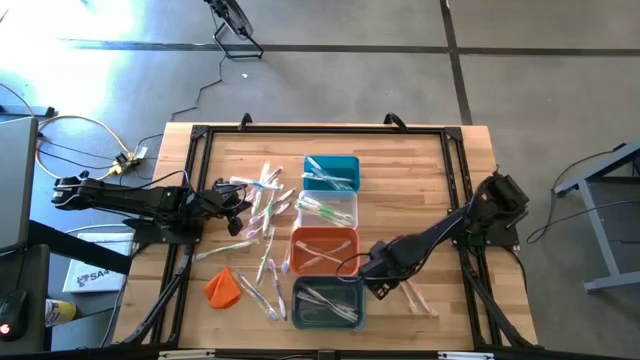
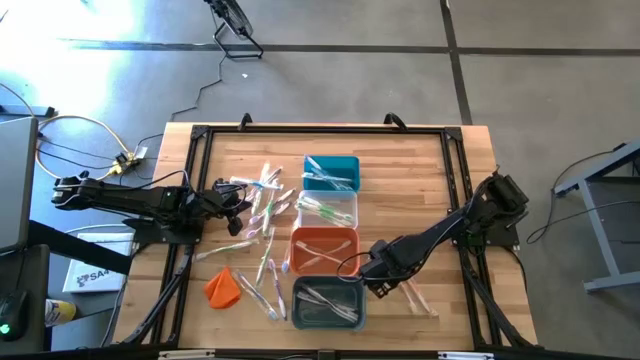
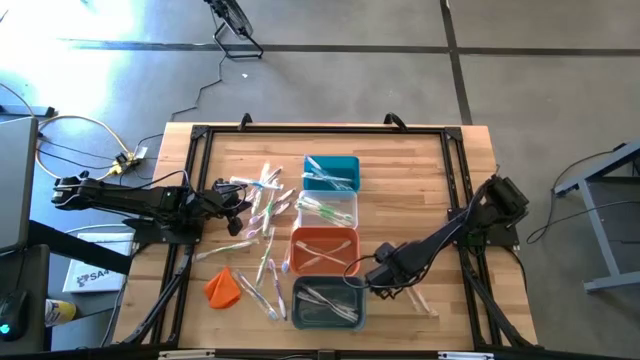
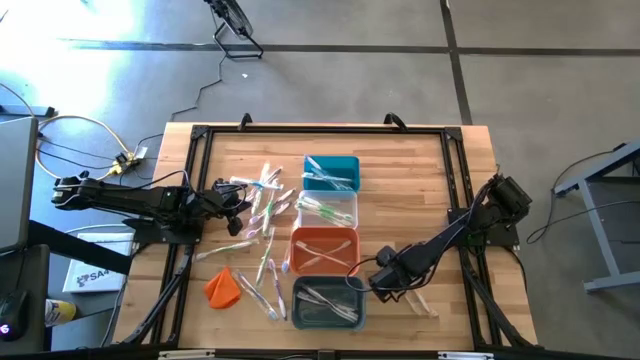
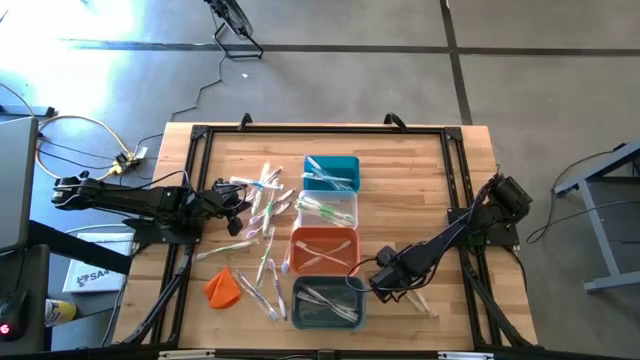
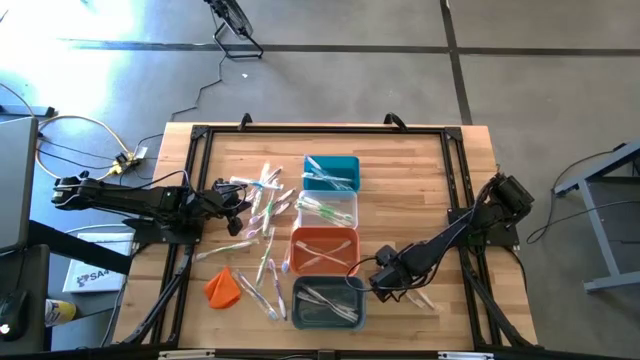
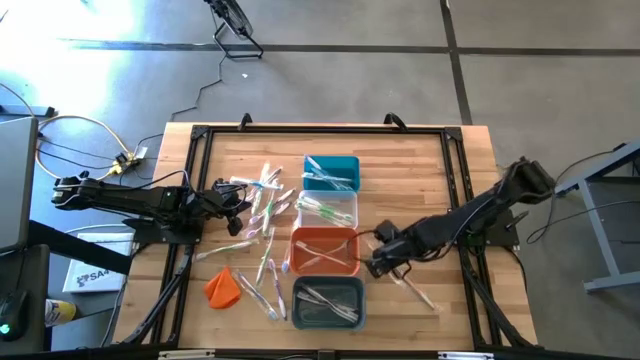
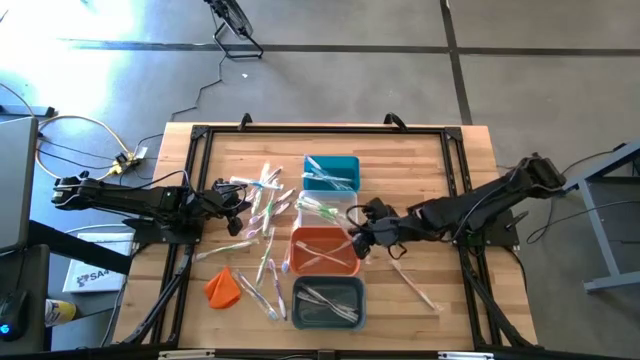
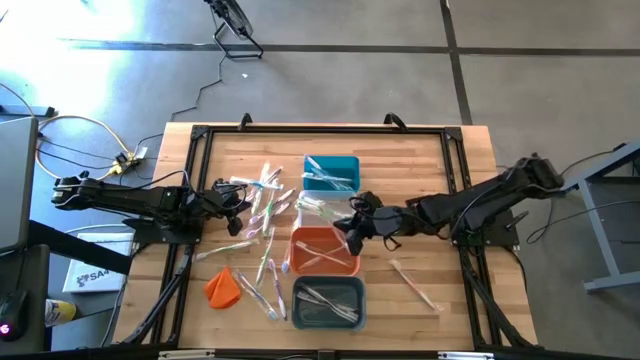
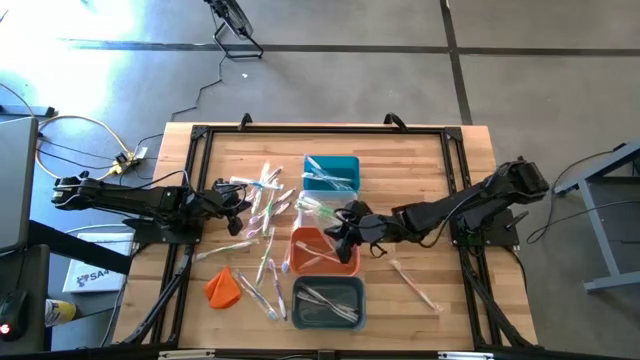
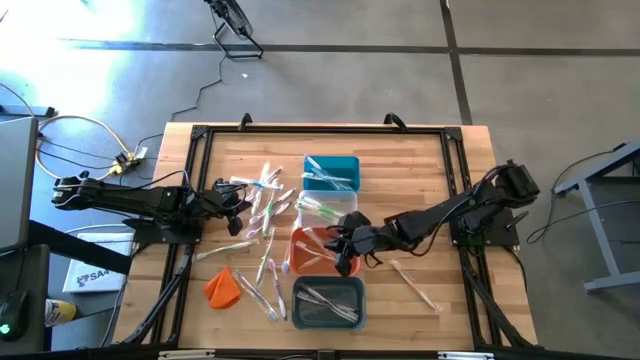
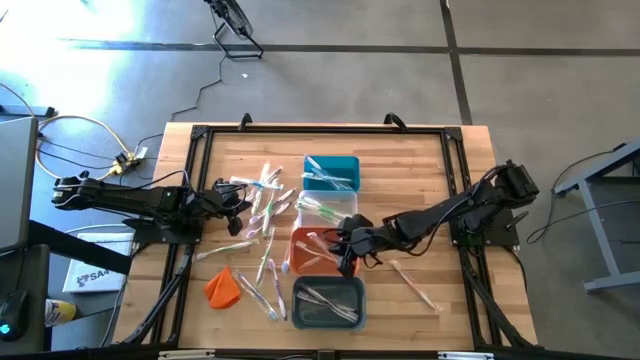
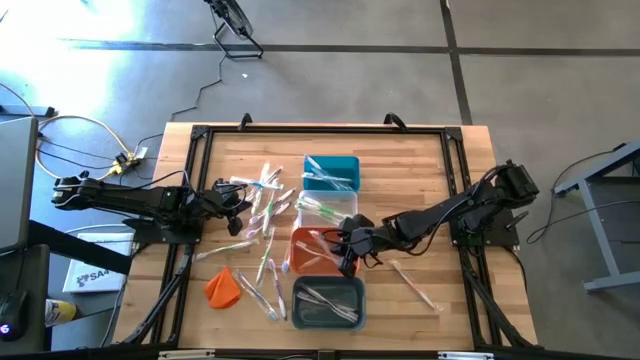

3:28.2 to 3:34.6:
Task: Pick & Place Toothbrushes
Put the orange toothbrush into the orange bin

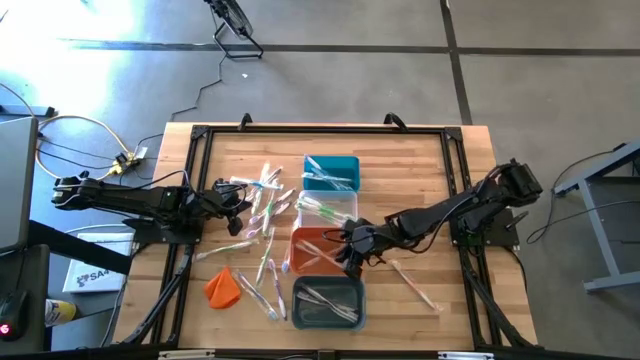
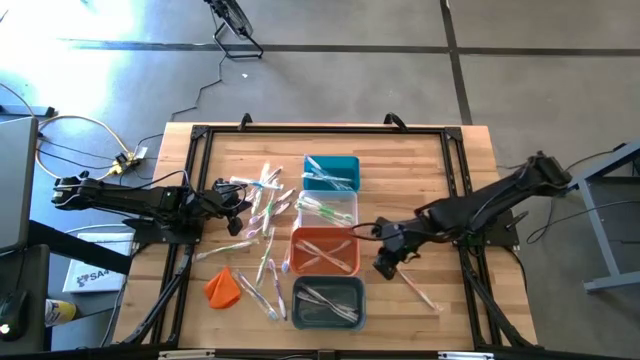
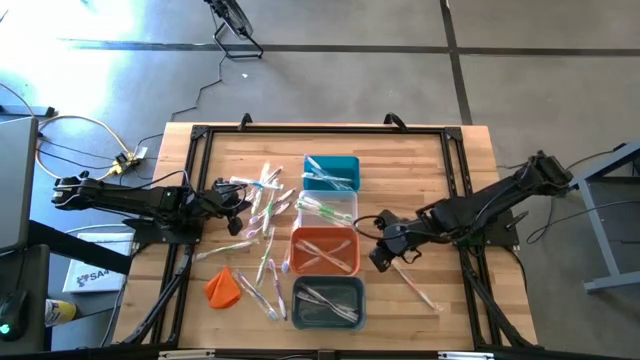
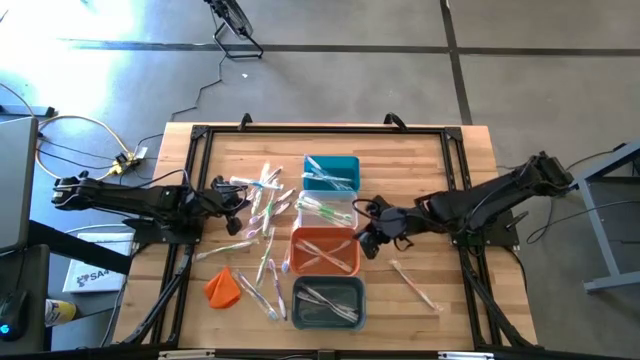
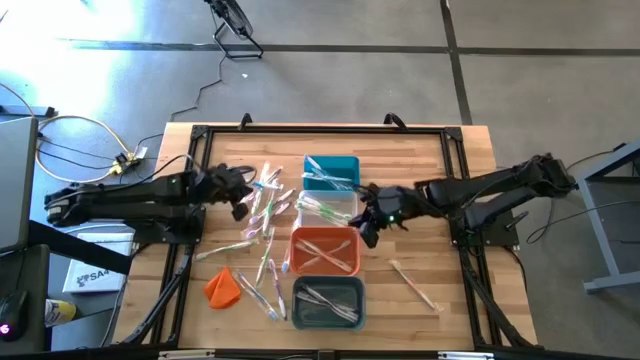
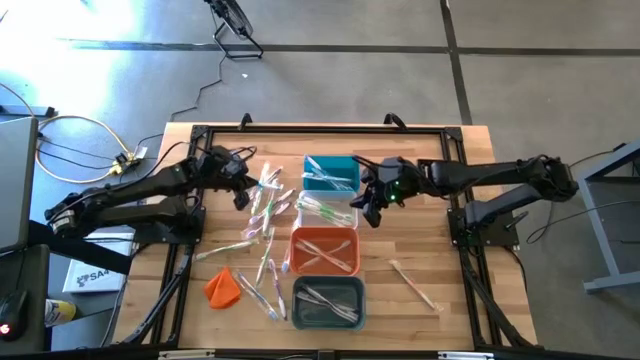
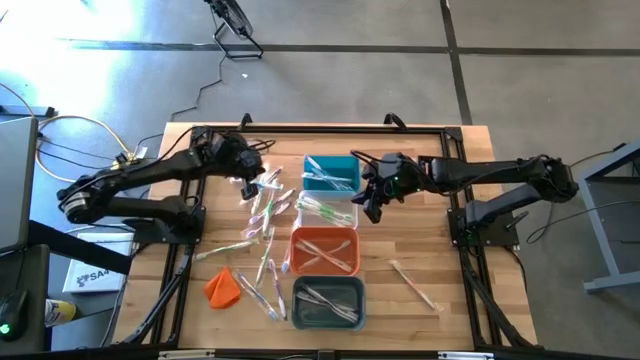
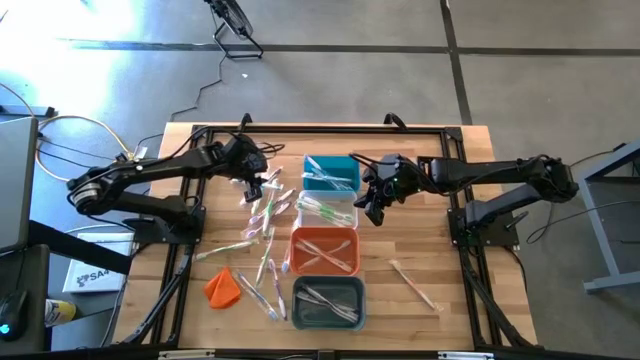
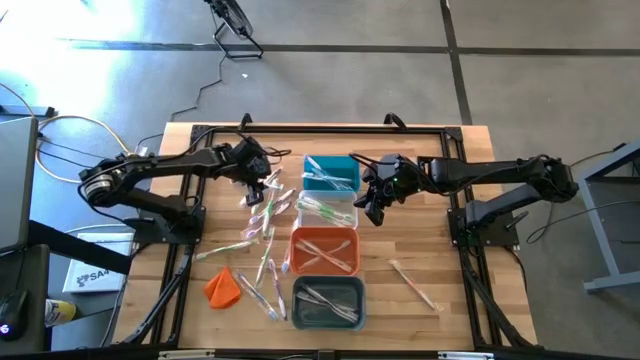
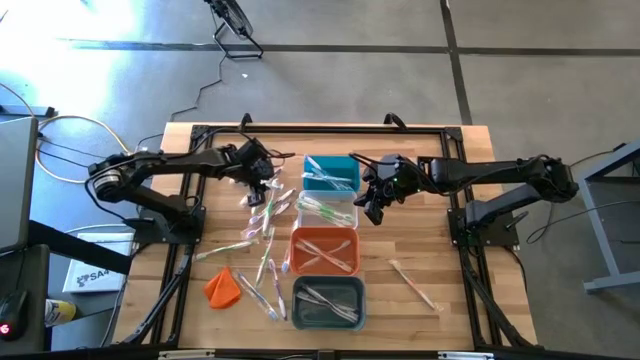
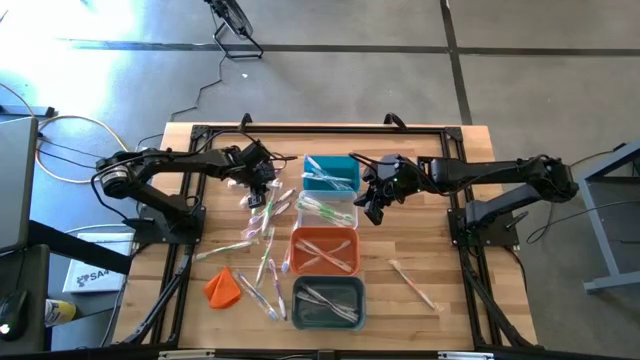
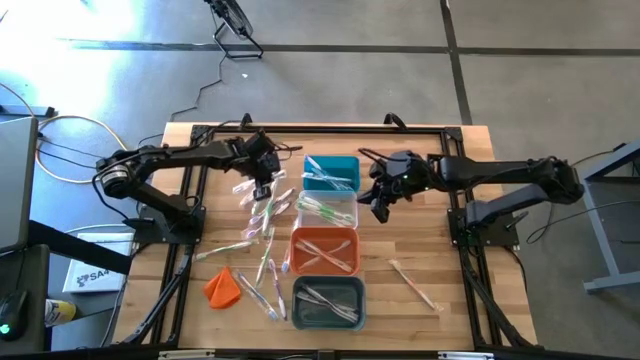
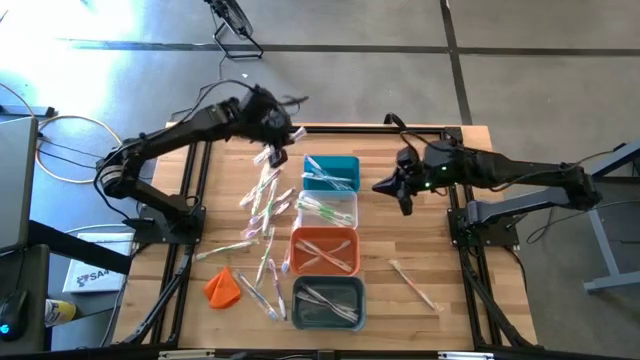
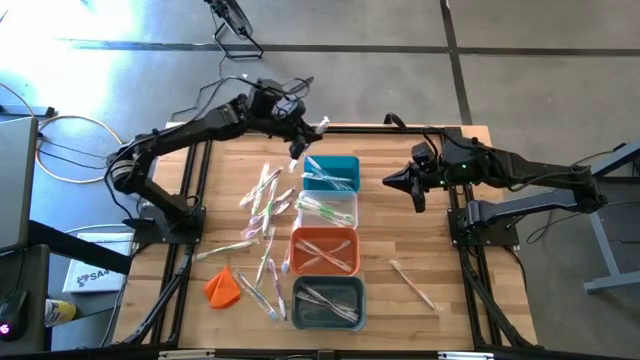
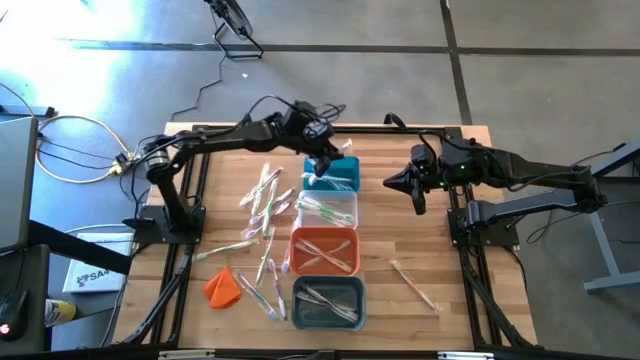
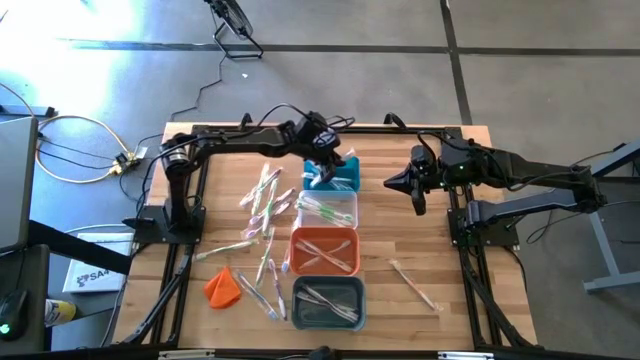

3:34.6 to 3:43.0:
Put the blue toothbrush into the blue bin

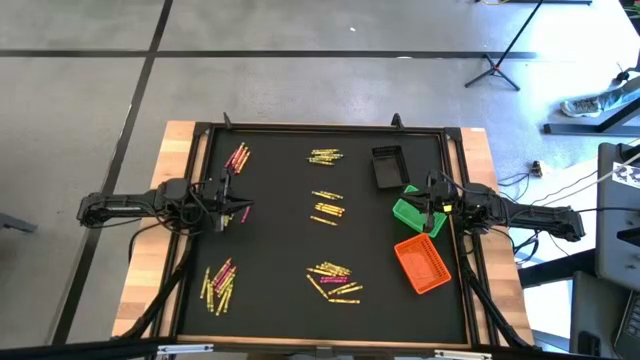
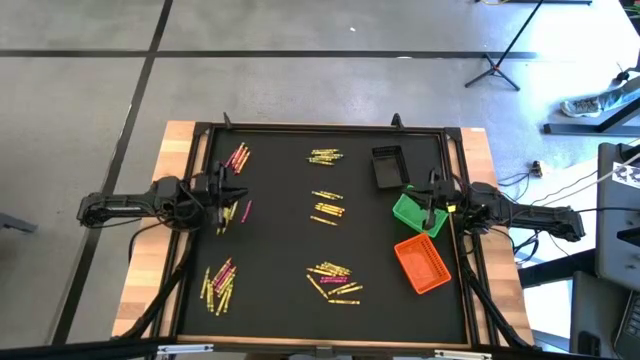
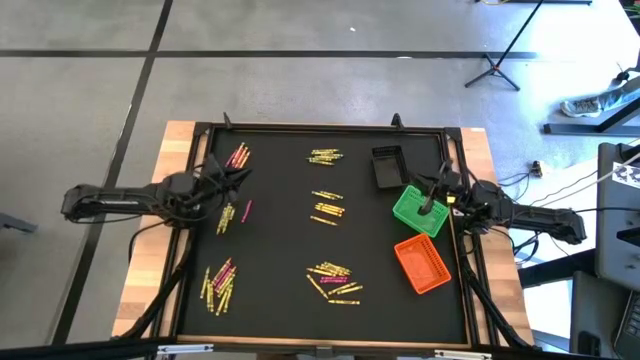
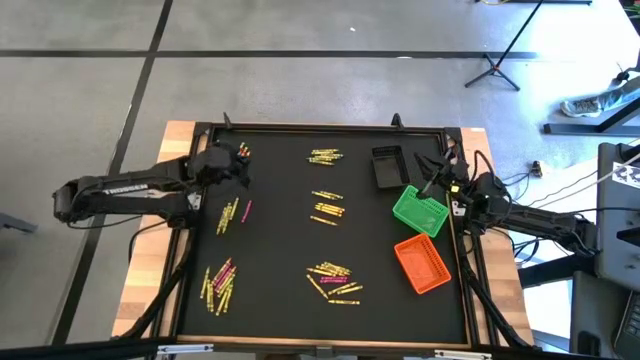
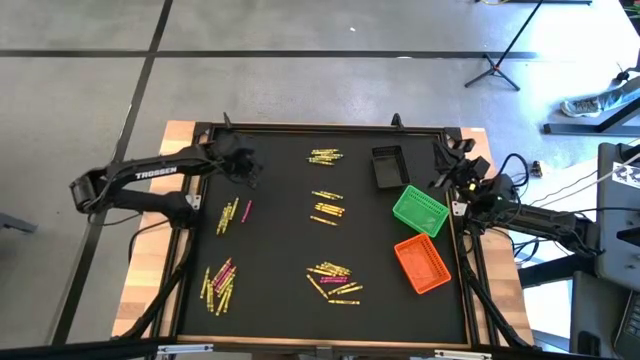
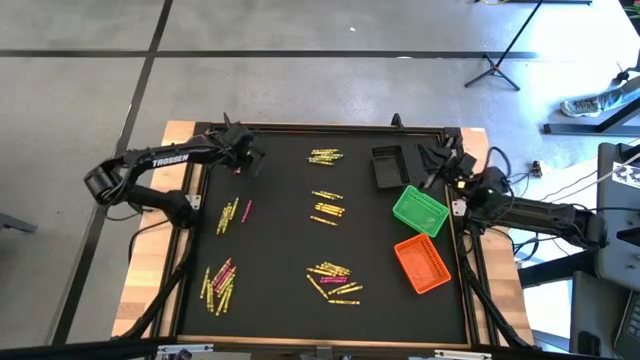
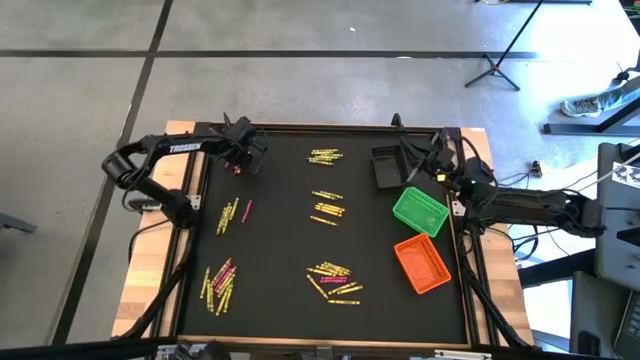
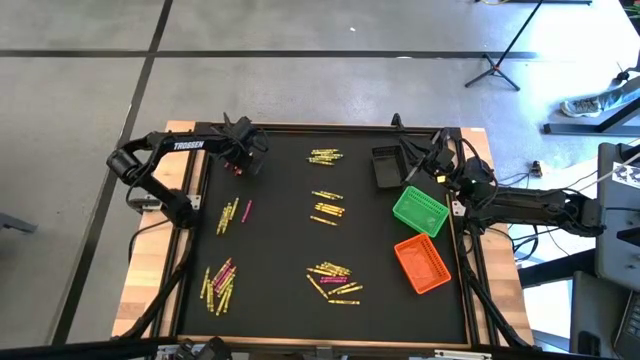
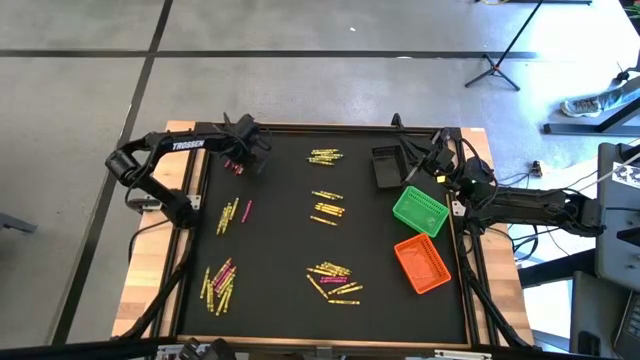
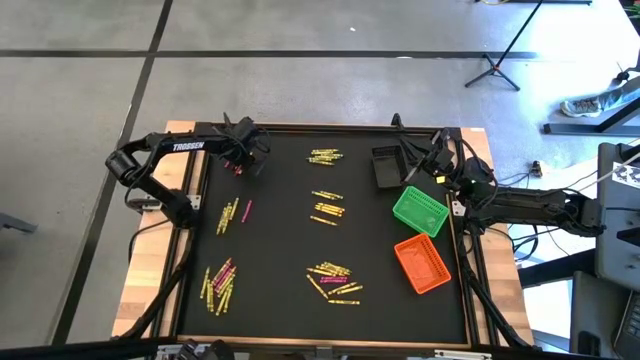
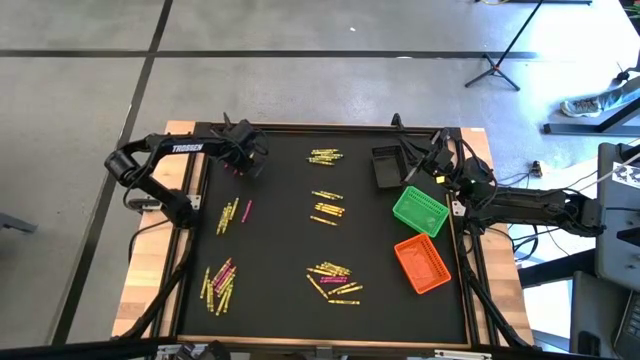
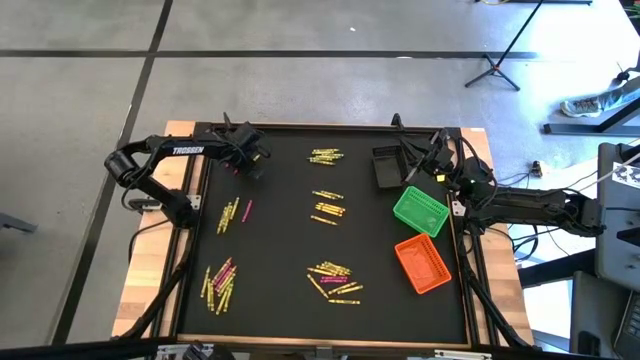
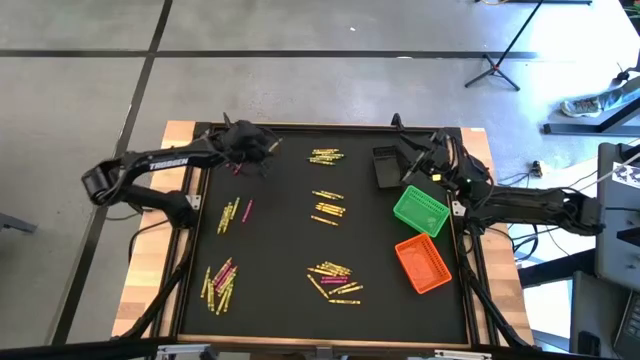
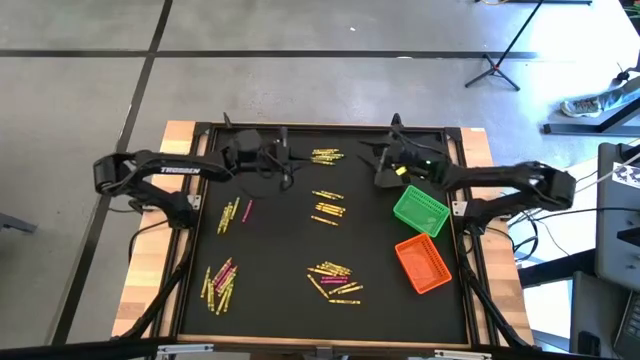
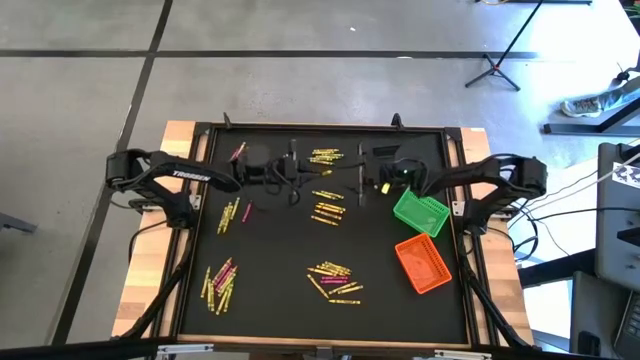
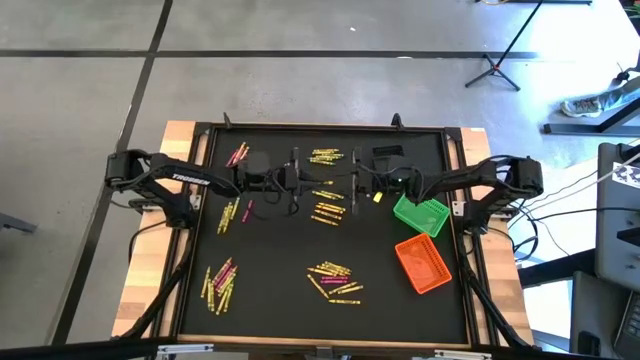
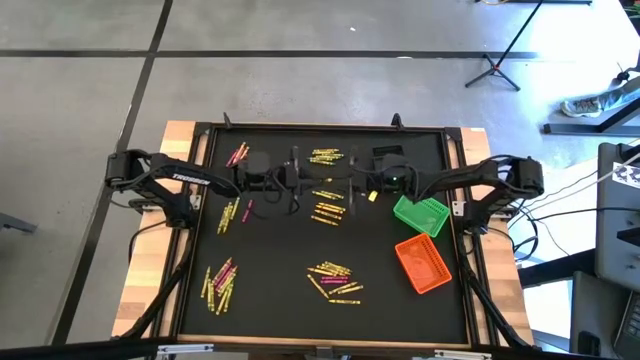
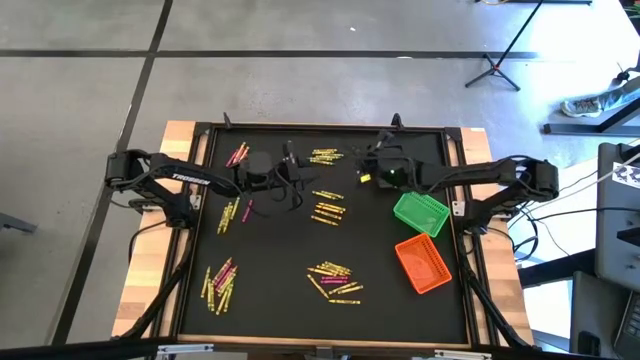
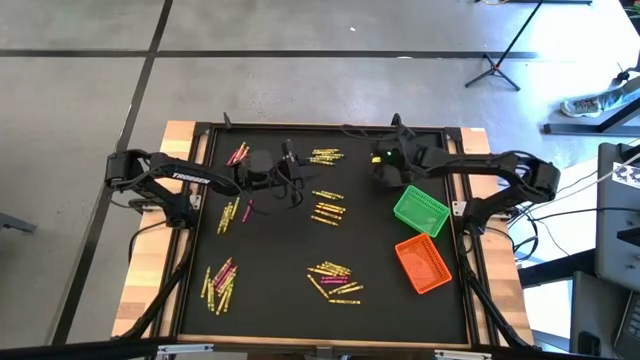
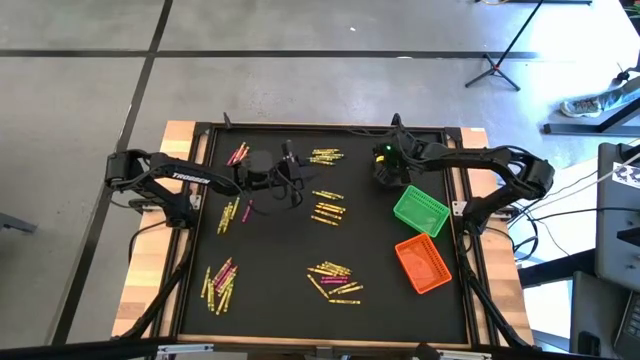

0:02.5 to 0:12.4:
Task: Sort crayons
Put the yellow crayon into the black basket
